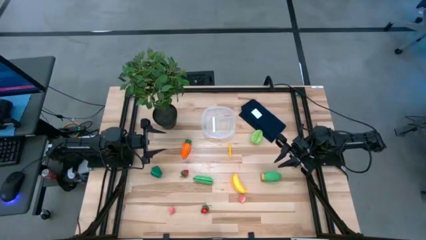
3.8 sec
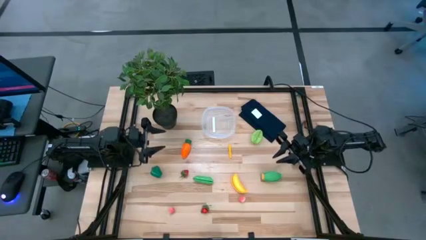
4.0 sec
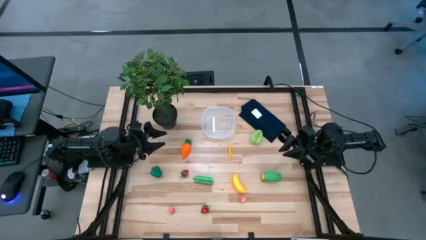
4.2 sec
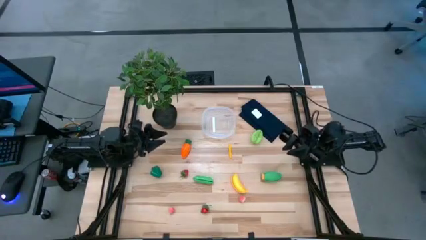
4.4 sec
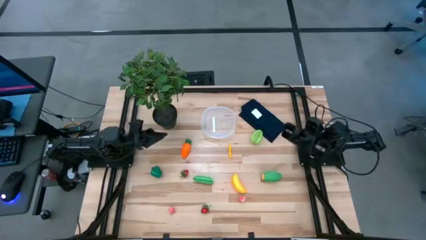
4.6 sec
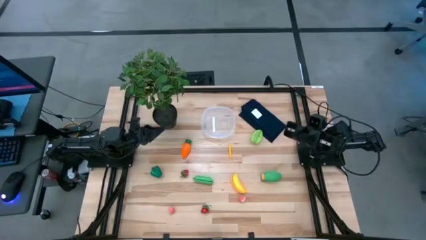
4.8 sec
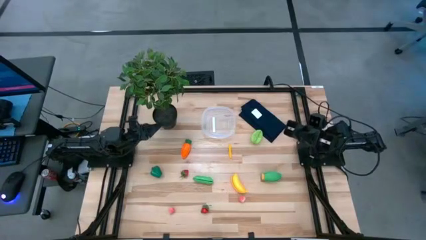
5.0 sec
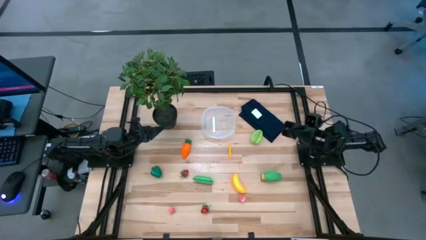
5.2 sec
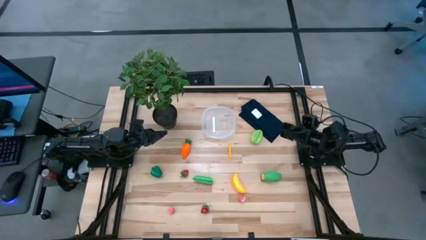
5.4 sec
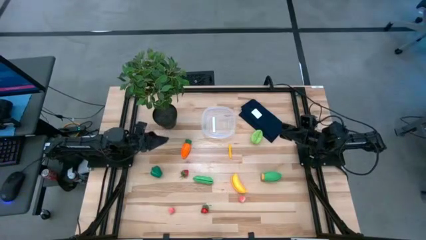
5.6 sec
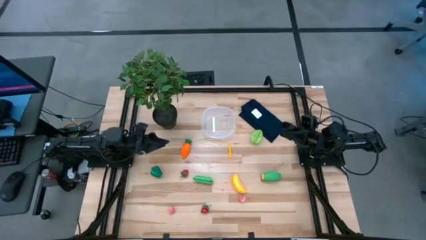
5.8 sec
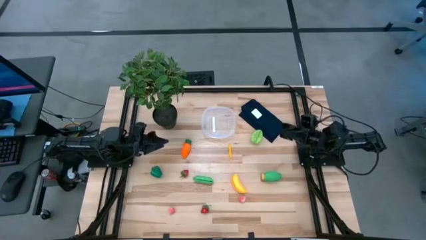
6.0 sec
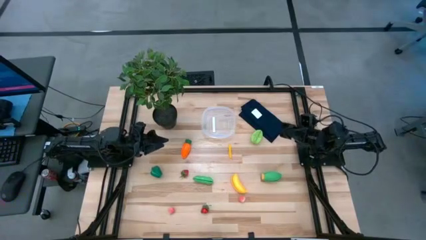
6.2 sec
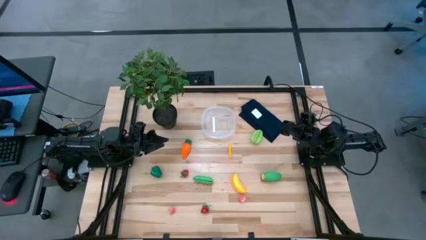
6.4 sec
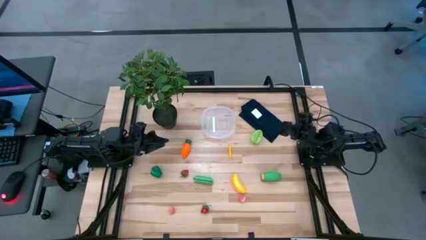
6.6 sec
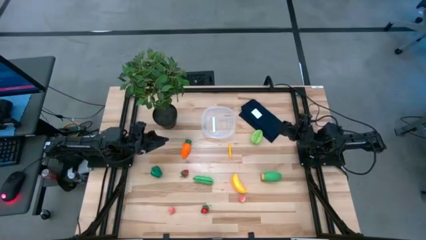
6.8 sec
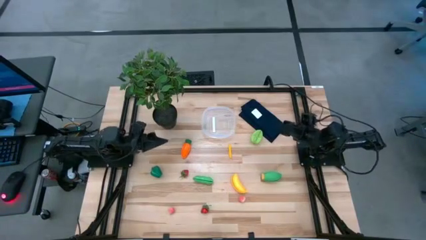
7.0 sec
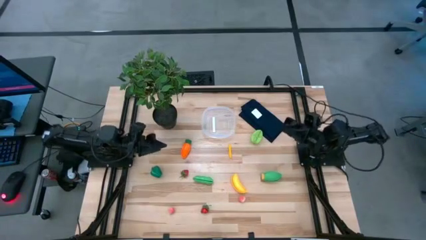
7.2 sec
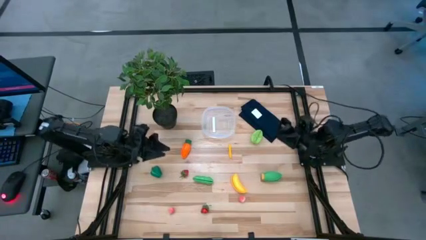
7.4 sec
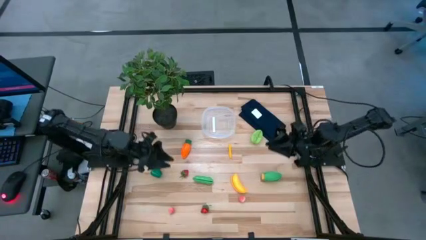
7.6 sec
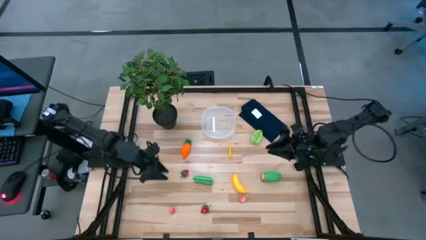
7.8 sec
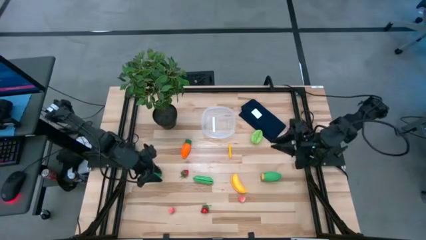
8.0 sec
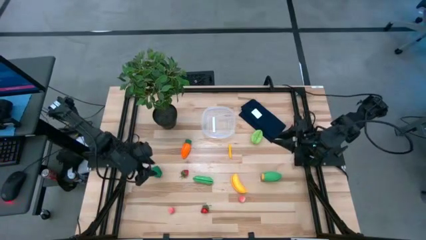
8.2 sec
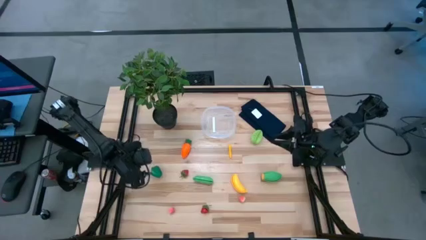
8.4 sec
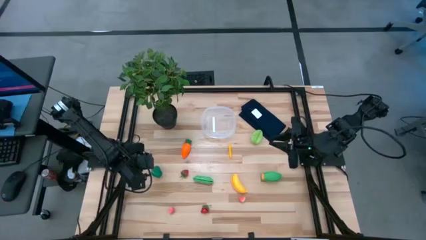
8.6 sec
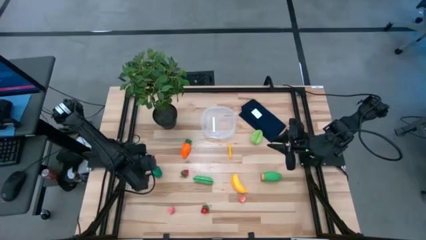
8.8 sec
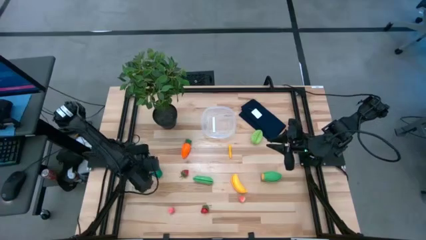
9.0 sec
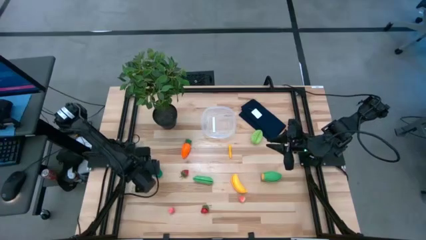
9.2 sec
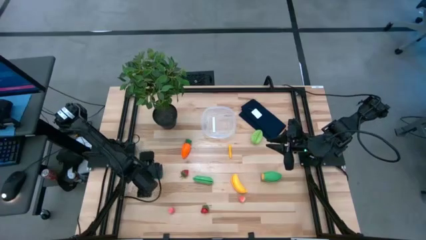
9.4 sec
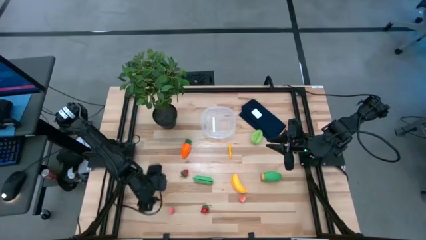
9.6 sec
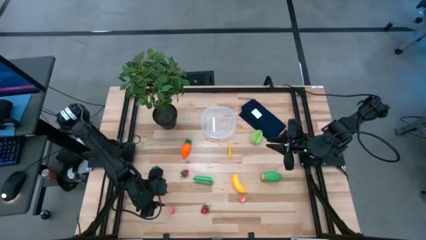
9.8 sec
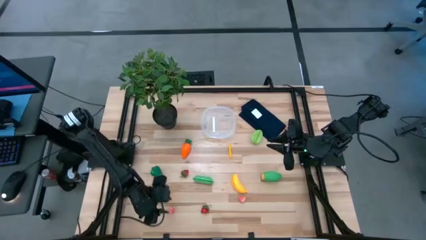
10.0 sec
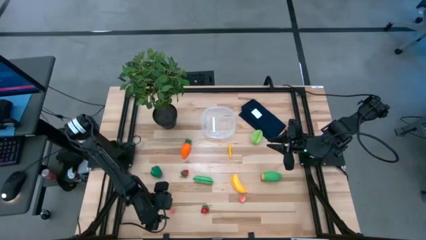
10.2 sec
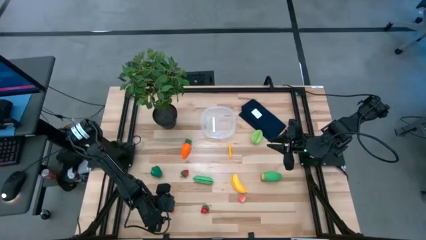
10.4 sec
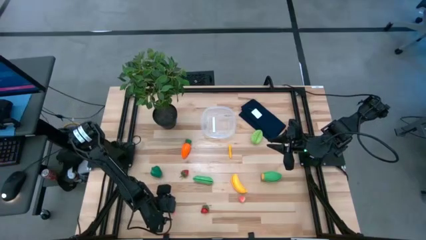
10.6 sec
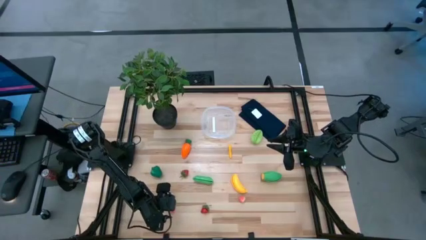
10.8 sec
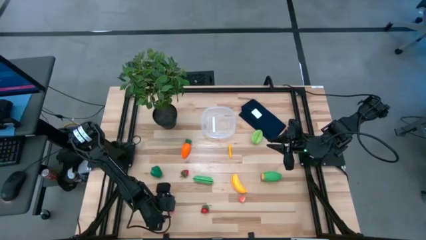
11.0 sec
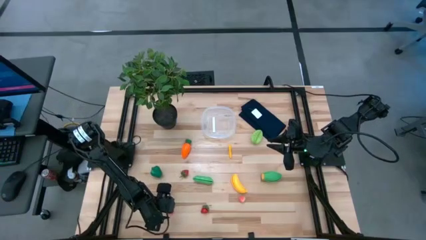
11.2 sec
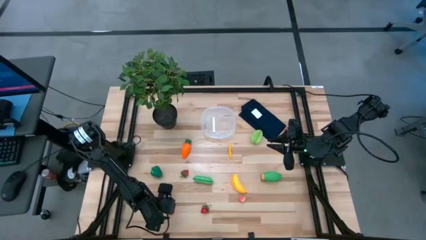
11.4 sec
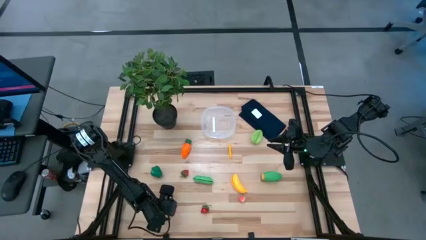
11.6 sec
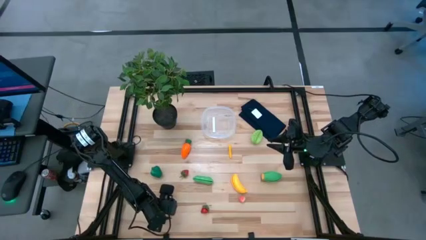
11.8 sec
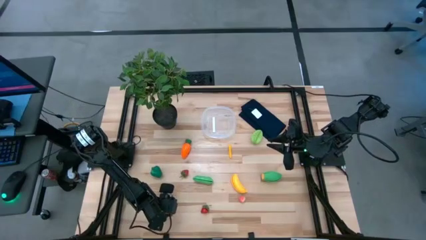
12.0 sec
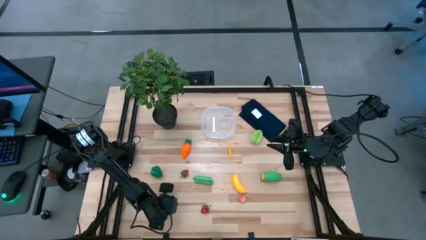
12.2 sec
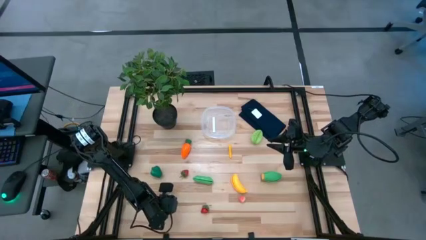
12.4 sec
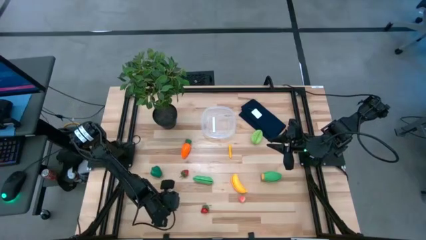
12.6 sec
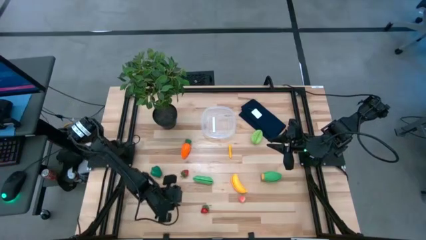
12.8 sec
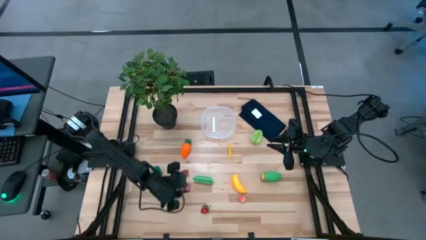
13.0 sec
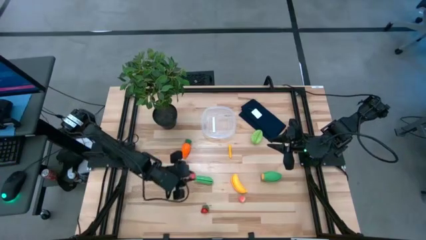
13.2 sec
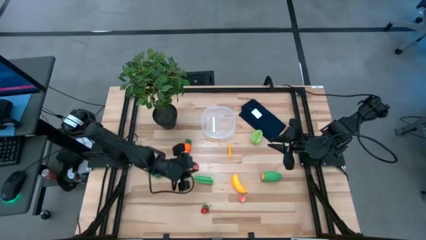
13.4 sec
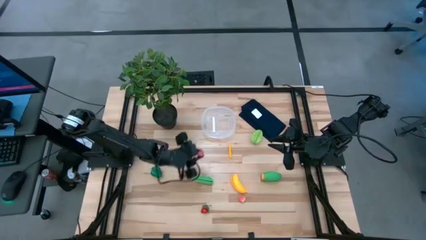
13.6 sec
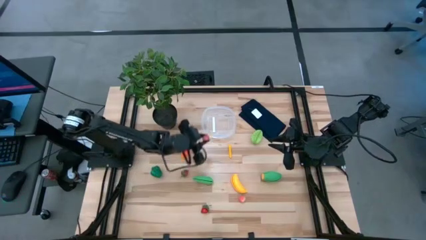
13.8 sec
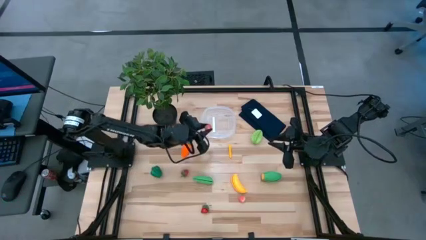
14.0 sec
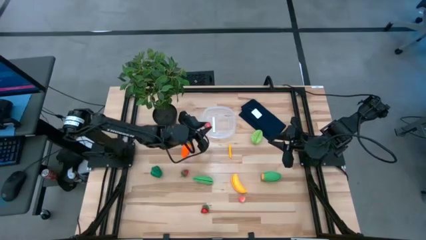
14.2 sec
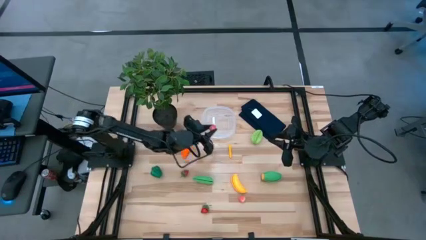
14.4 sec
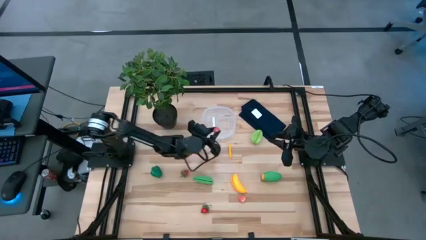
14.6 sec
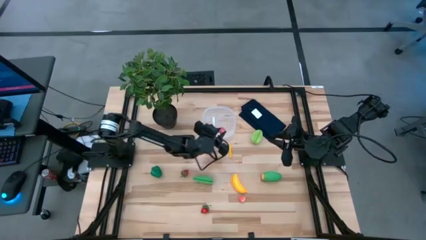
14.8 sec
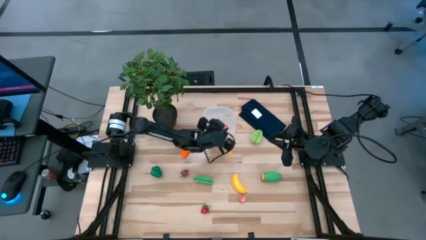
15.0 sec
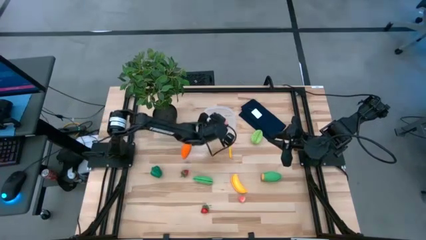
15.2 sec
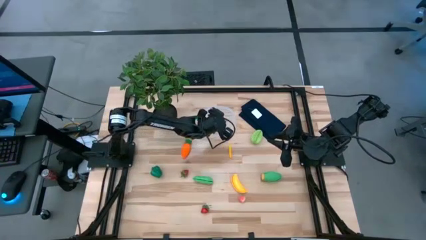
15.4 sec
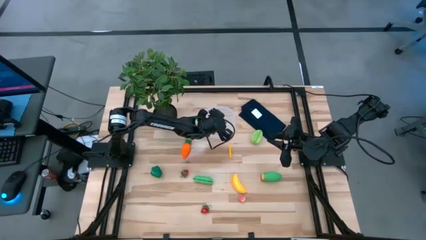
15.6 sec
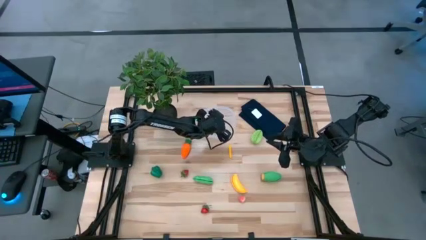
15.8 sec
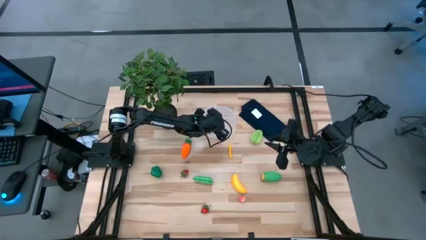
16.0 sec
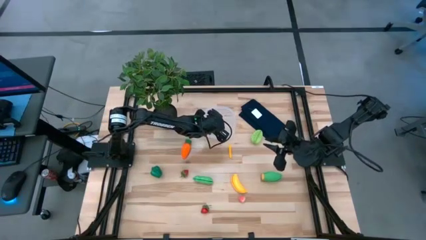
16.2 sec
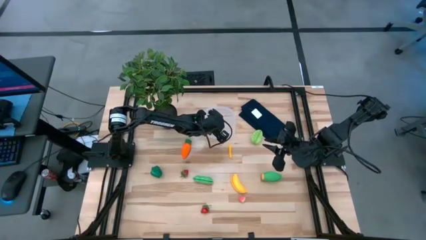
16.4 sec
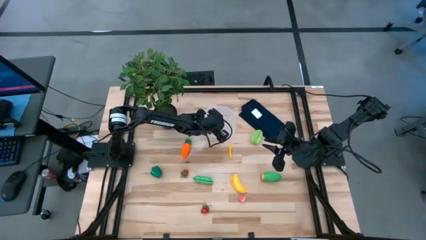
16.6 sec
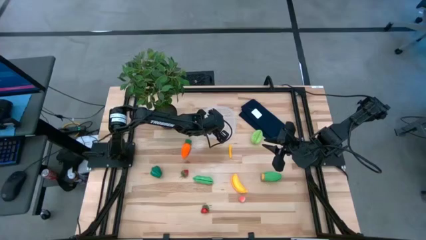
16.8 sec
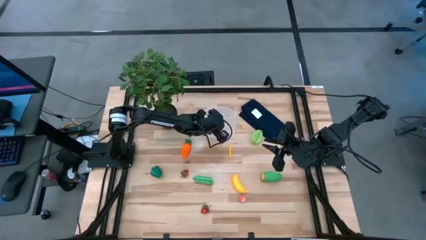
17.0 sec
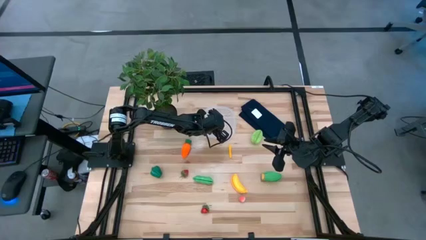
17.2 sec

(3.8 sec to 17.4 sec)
Task: Pick and placing Produce into tupperware
Put the left pink peach into the transparent bin
